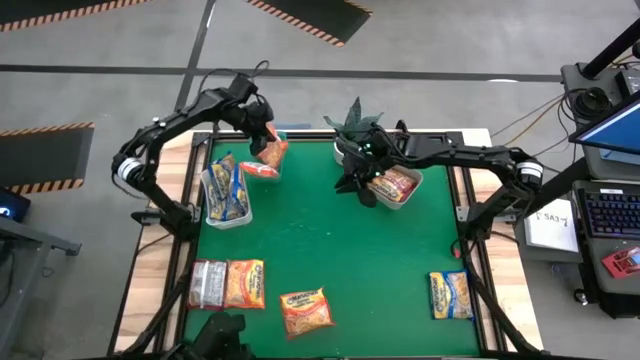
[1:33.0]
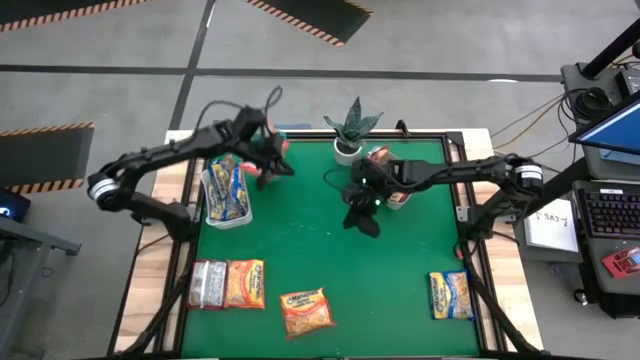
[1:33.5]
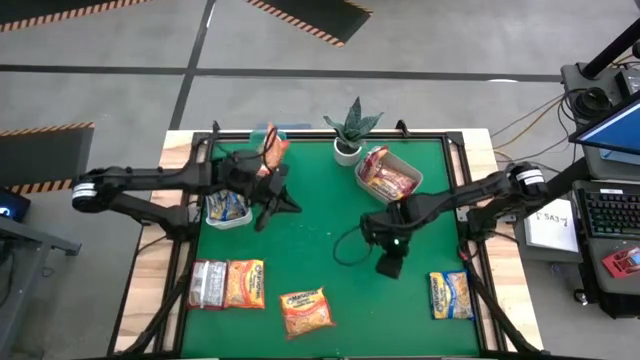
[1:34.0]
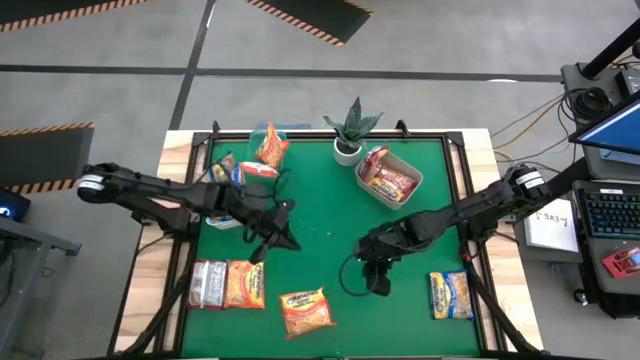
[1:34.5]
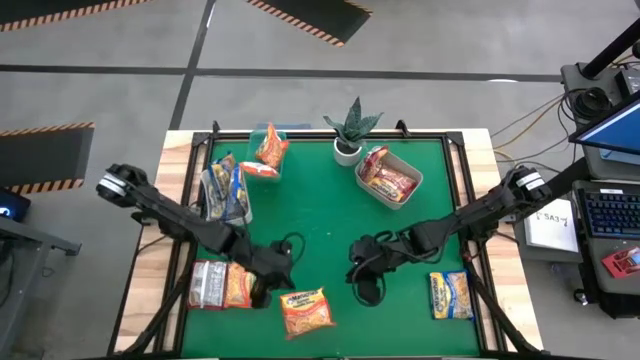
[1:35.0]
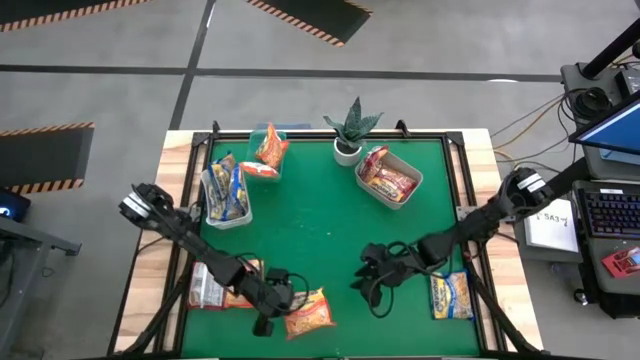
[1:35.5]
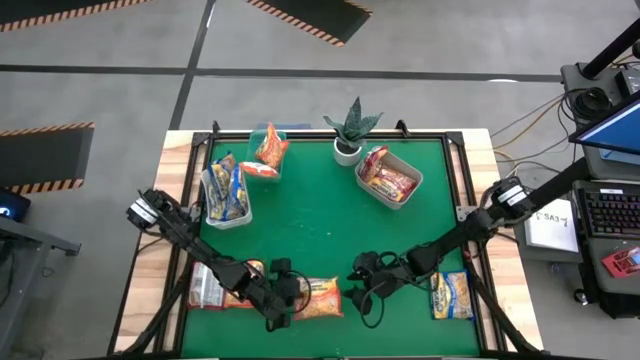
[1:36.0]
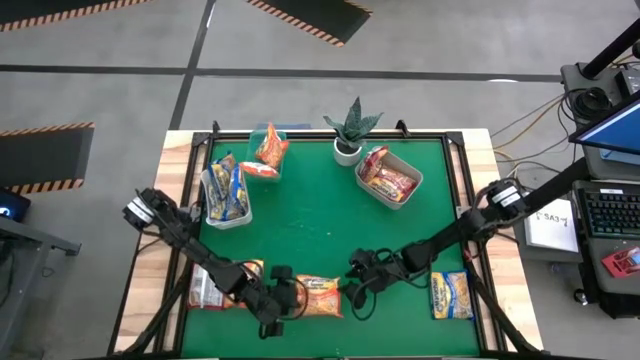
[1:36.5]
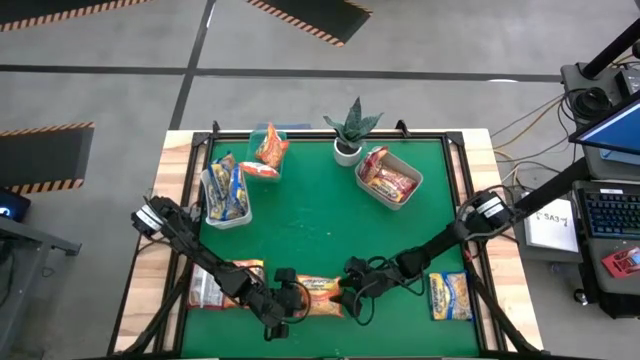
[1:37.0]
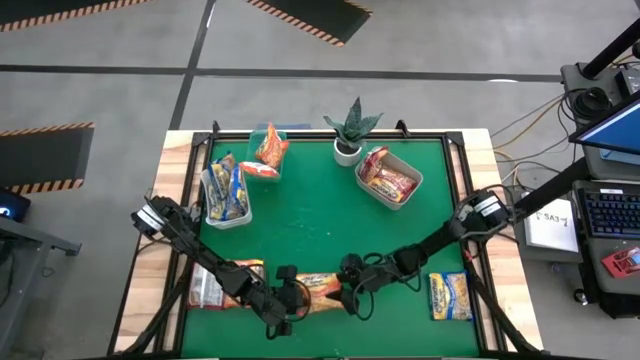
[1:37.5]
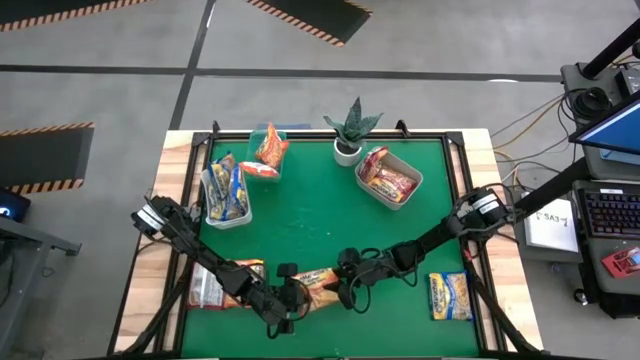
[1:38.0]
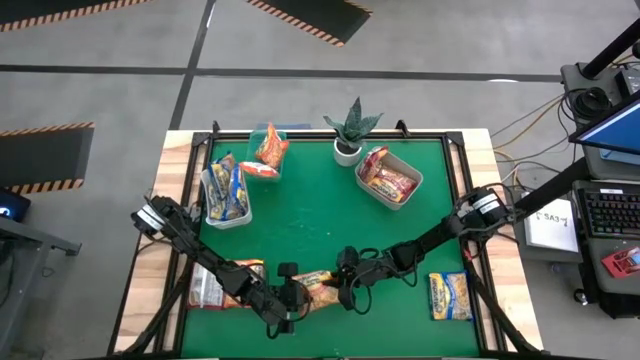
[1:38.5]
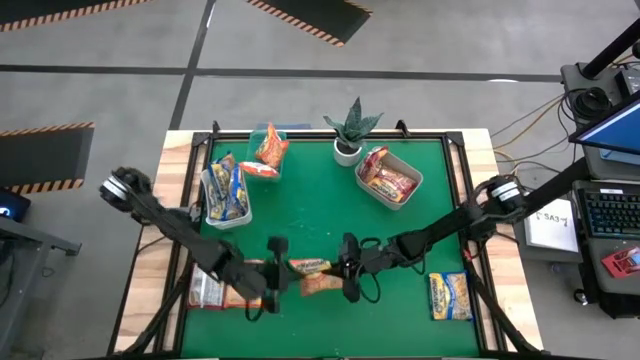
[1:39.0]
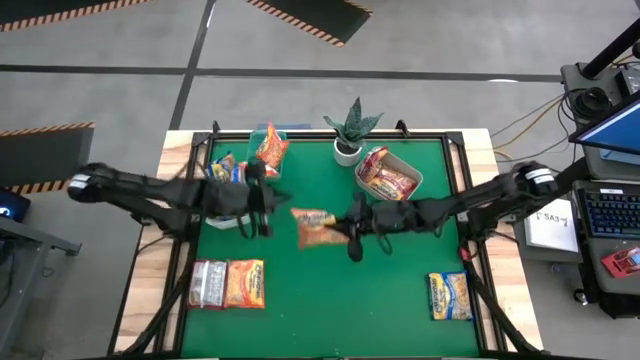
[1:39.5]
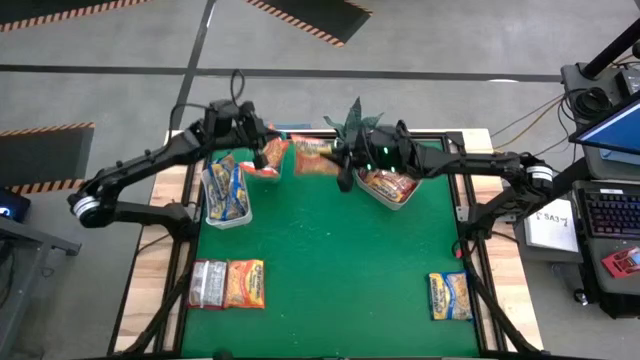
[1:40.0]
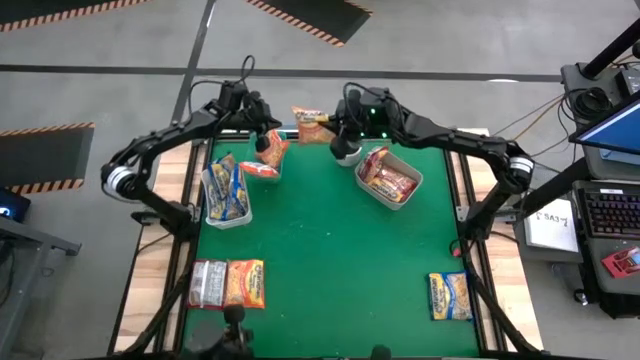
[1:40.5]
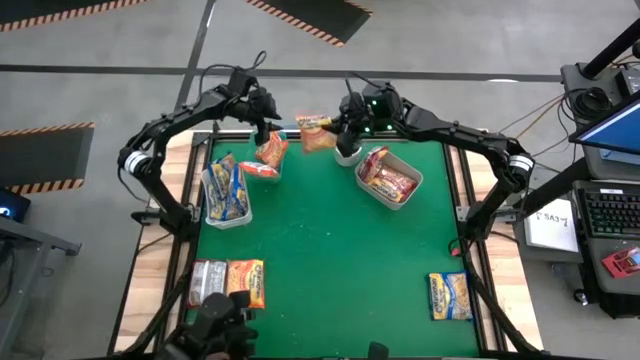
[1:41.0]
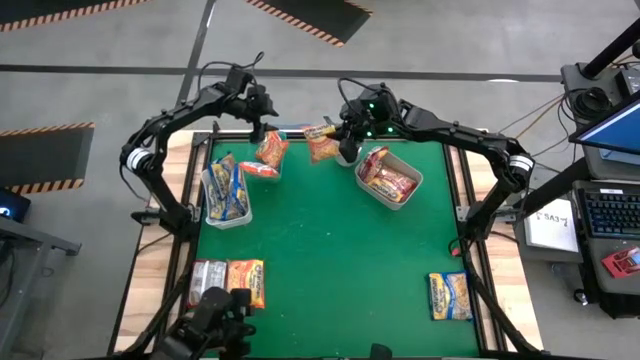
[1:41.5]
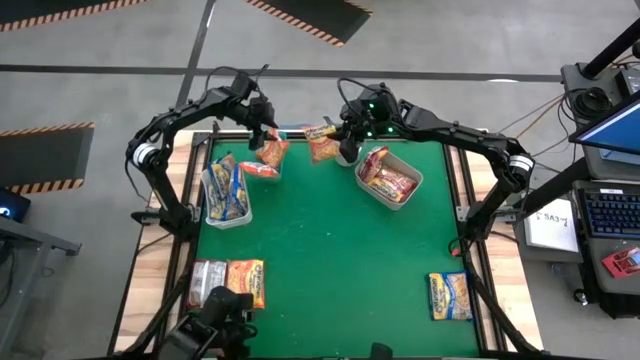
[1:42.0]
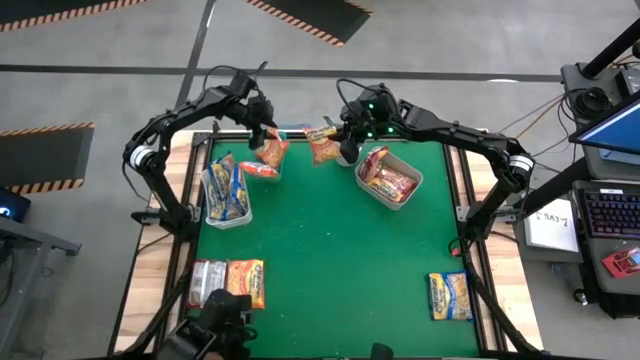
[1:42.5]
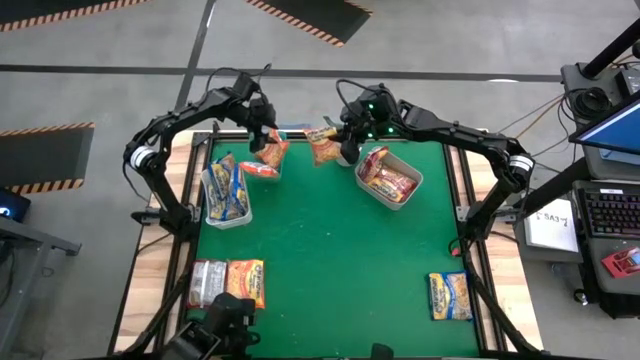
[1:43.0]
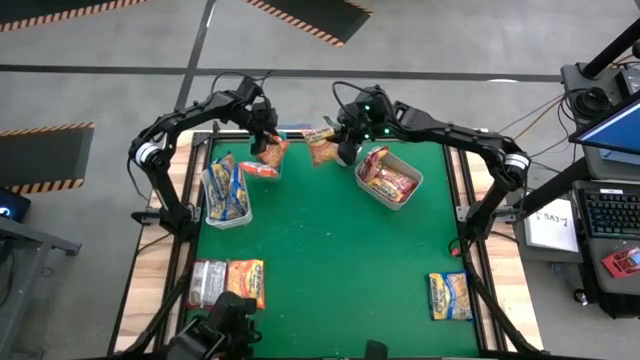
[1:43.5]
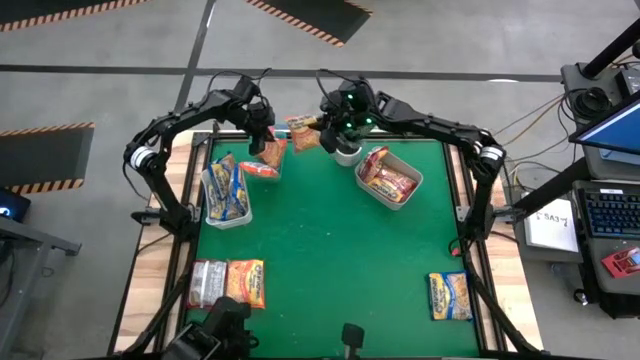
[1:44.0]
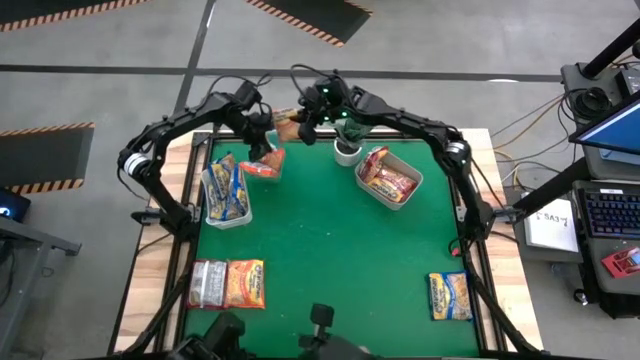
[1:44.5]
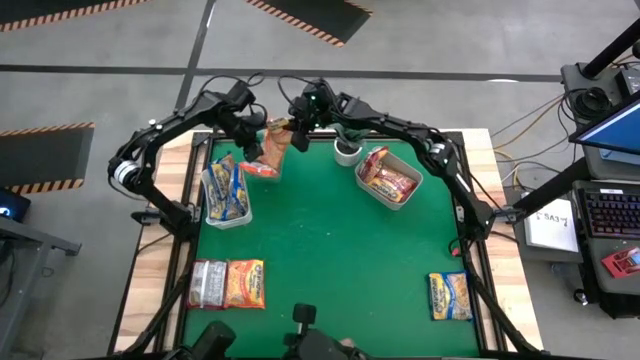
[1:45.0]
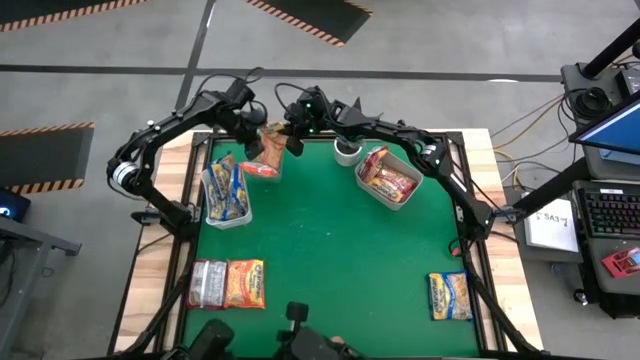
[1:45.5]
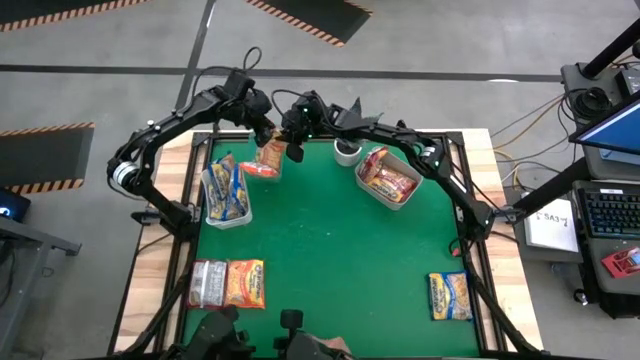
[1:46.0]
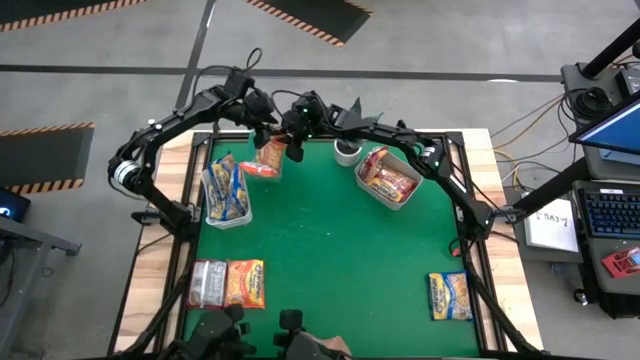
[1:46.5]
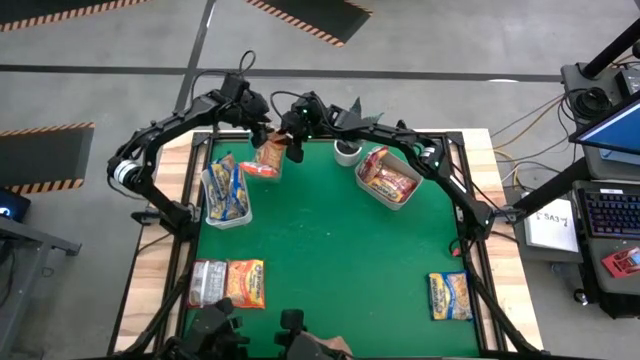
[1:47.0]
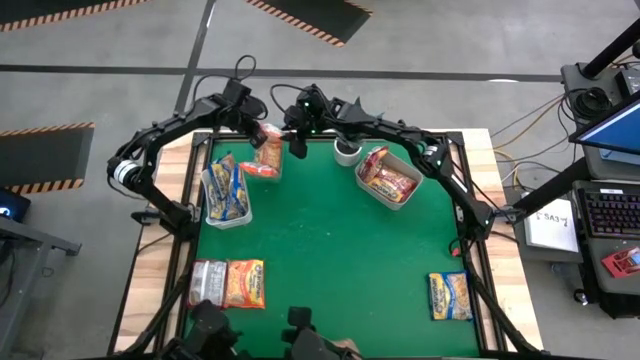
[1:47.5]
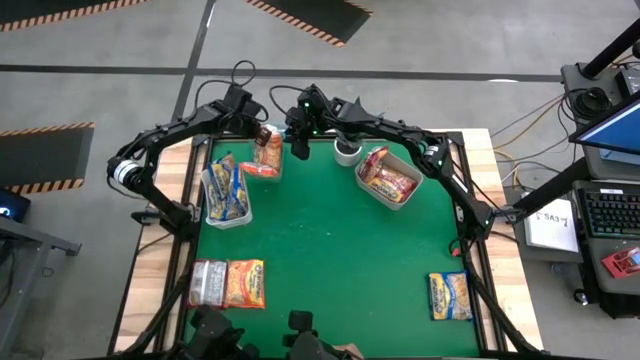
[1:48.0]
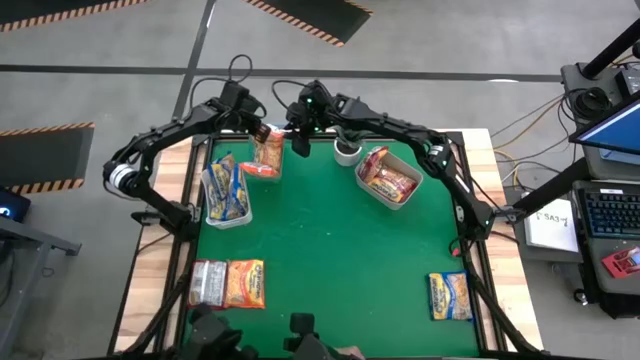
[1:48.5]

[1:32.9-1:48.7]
Task: Sort Maruchan noodles
Put the orange noodle pack into the green bin

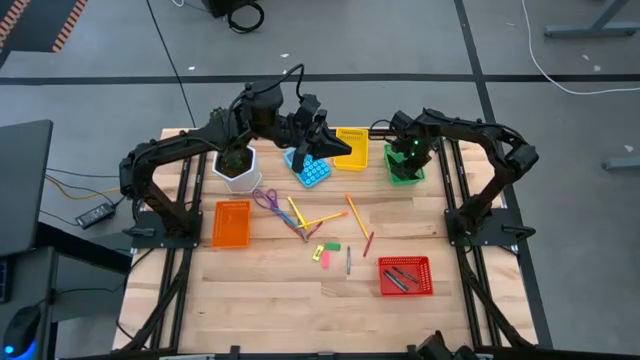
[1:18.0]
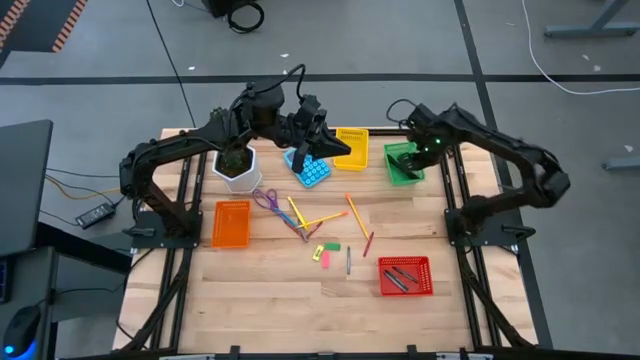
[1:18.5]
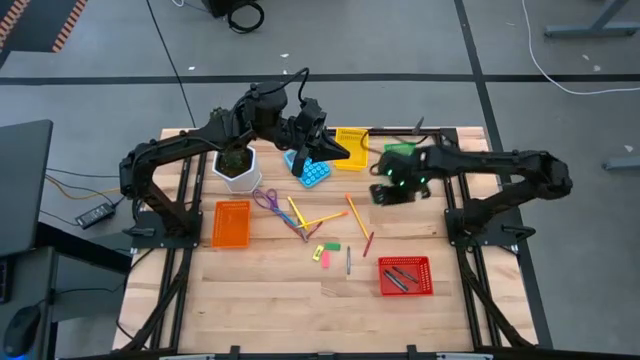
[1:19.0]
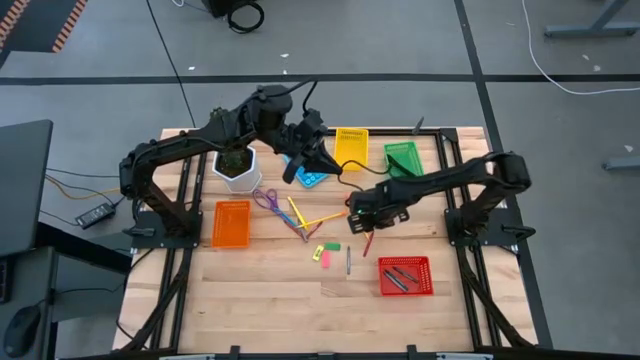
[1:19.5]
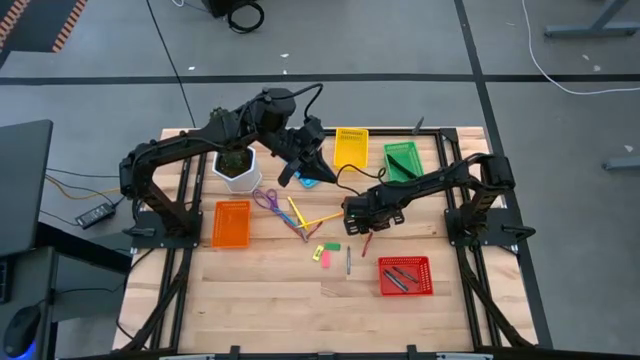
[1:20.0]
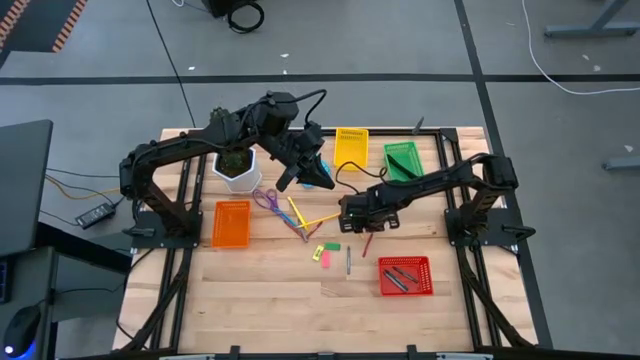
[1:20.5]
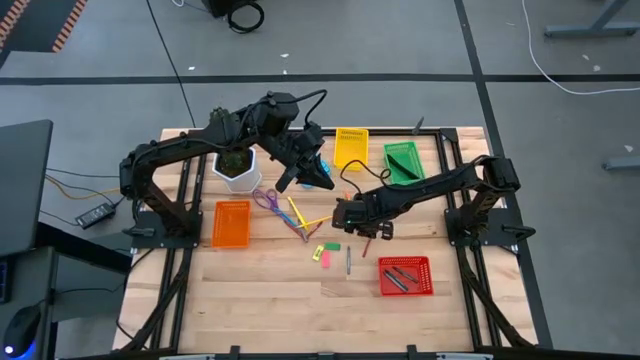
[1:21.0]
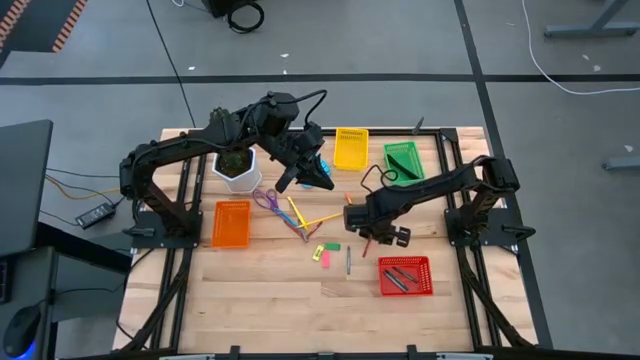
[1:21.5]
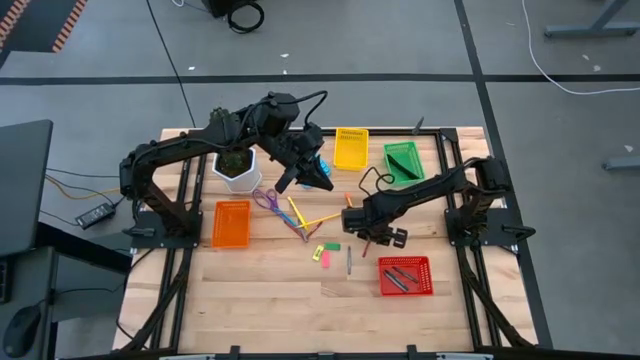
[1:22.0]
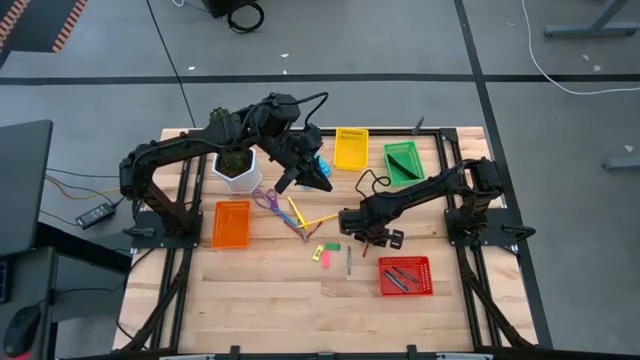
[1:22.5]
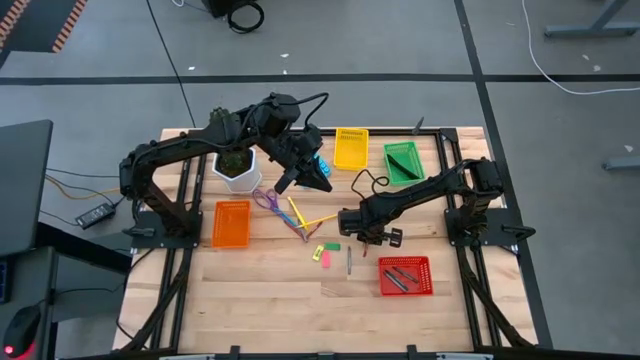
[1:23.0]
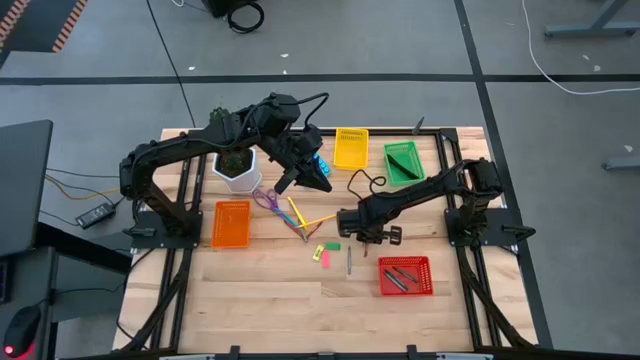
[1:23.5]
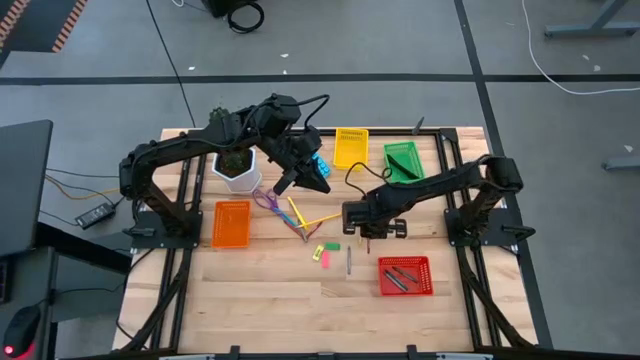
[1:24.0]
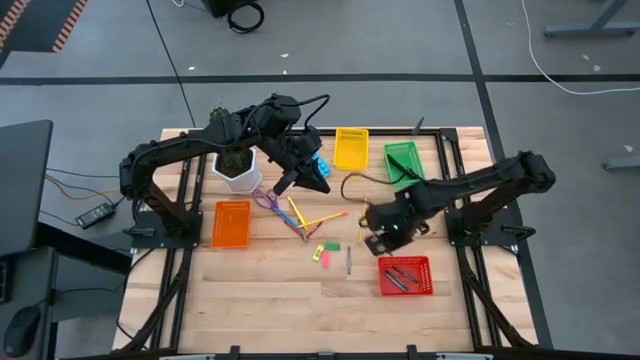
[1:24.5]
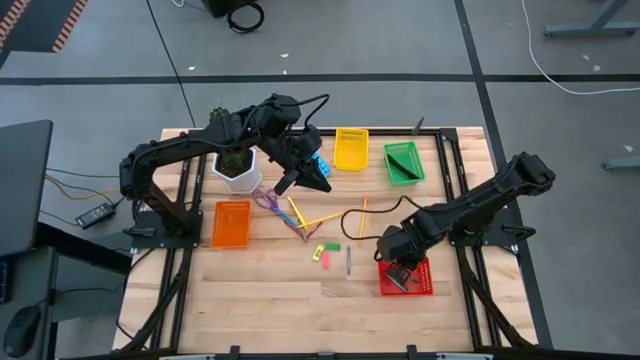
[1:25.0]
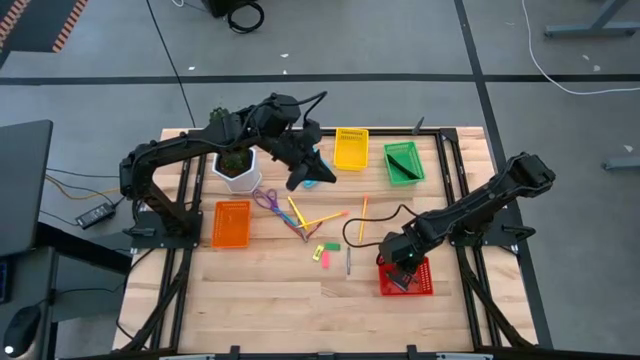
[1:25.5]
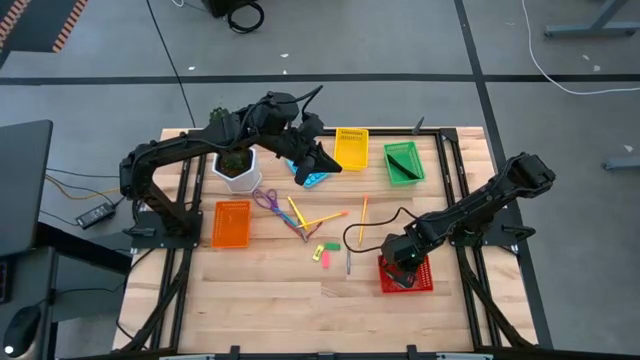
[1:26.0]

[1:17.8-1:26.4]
Task: Sort crayons/erasers/pens/pencils in bins
Put the right red crayon into the red bin
